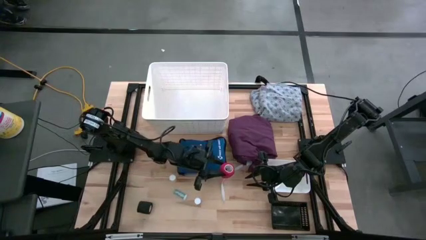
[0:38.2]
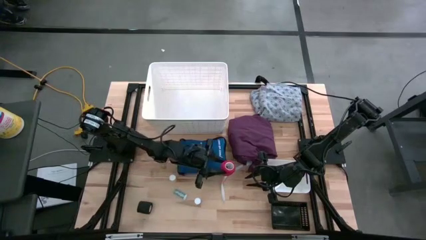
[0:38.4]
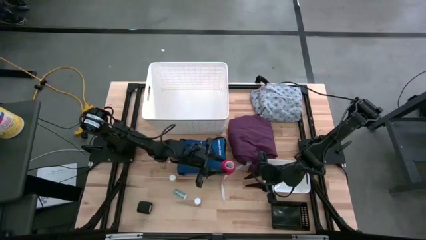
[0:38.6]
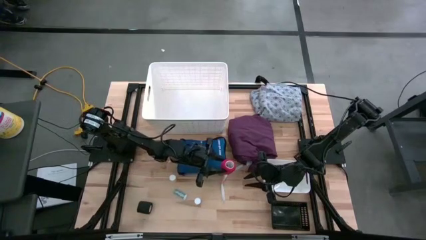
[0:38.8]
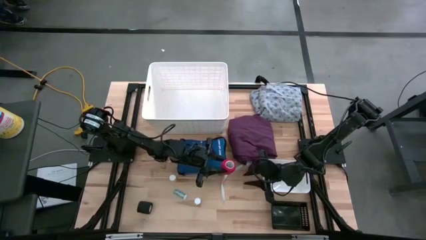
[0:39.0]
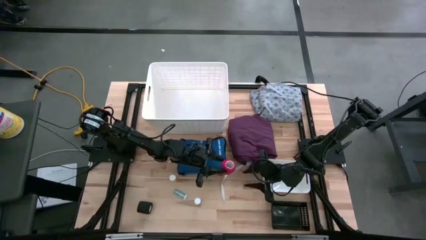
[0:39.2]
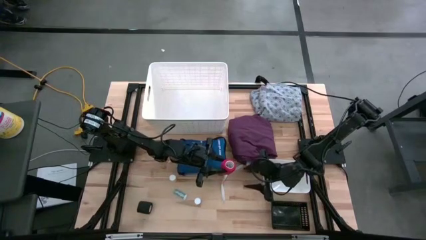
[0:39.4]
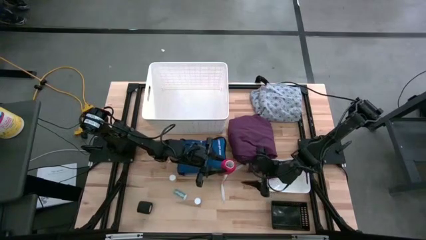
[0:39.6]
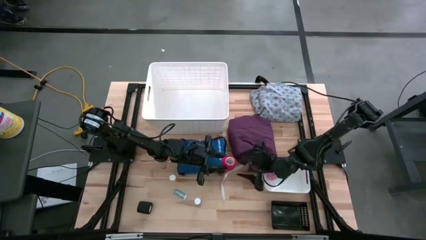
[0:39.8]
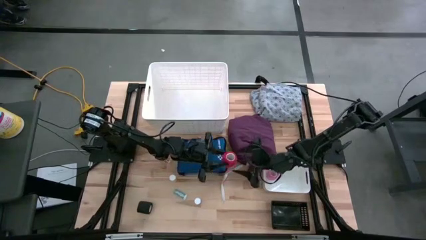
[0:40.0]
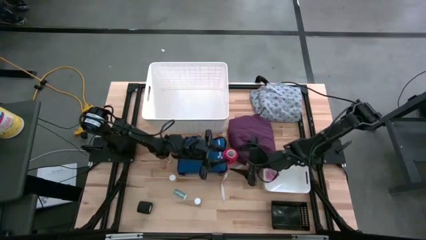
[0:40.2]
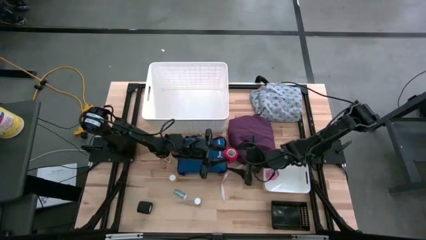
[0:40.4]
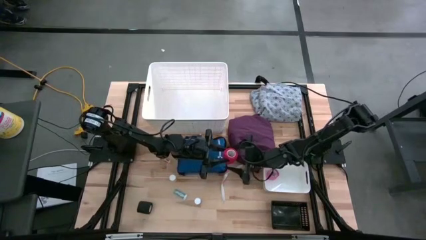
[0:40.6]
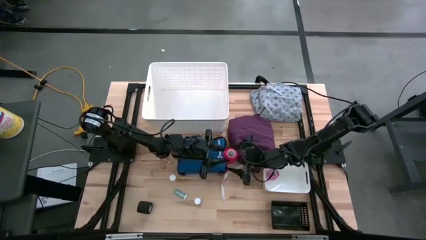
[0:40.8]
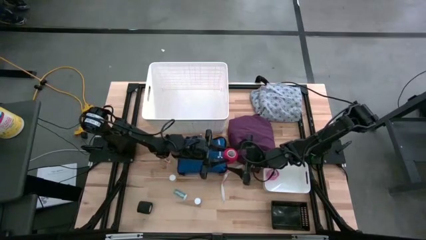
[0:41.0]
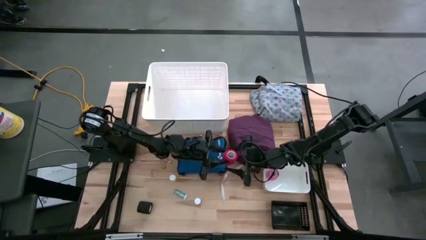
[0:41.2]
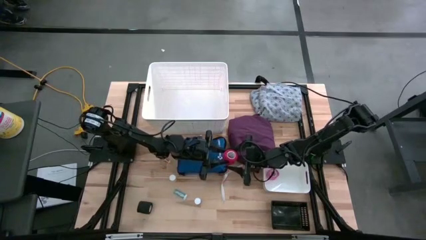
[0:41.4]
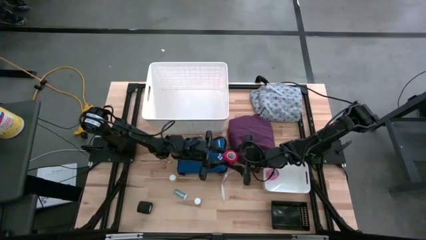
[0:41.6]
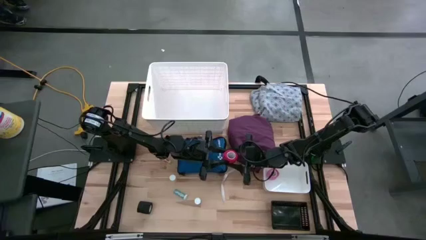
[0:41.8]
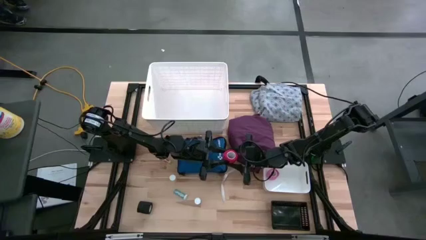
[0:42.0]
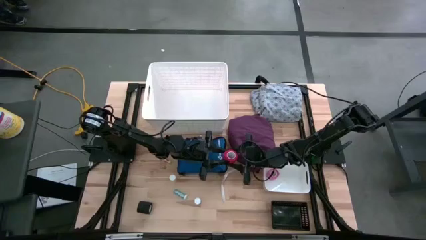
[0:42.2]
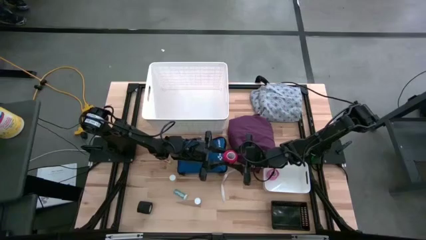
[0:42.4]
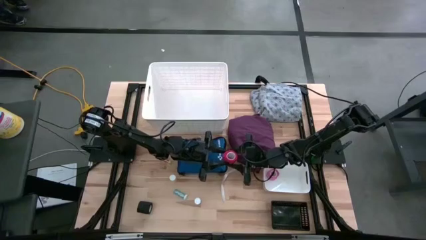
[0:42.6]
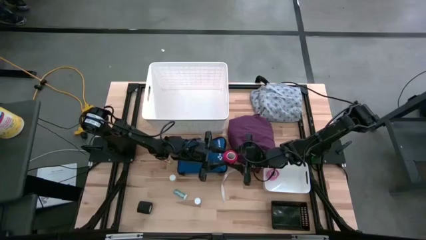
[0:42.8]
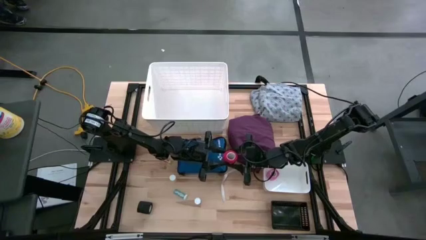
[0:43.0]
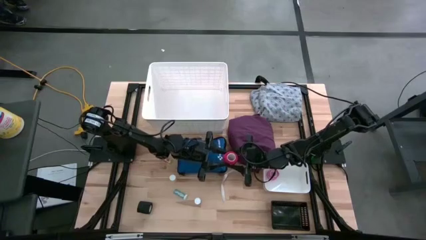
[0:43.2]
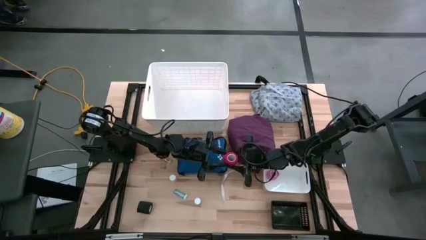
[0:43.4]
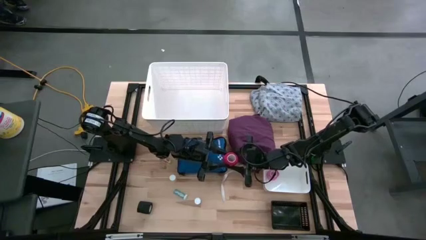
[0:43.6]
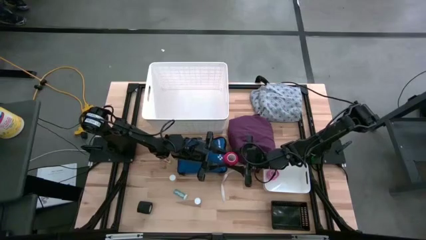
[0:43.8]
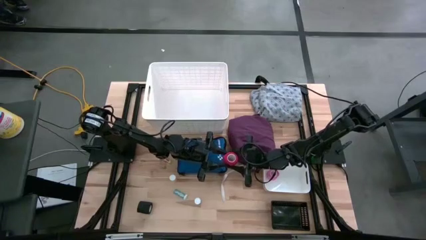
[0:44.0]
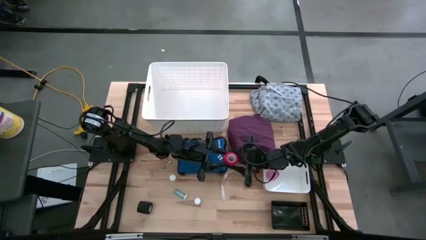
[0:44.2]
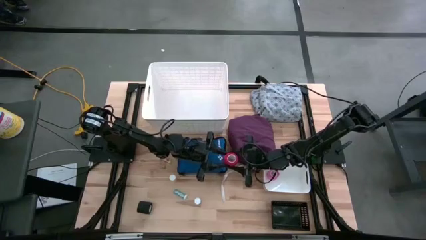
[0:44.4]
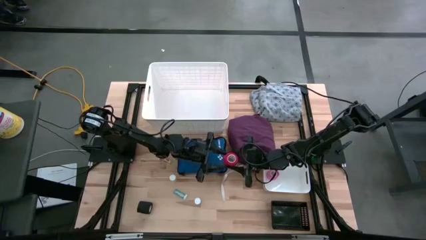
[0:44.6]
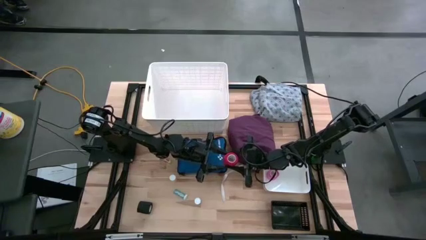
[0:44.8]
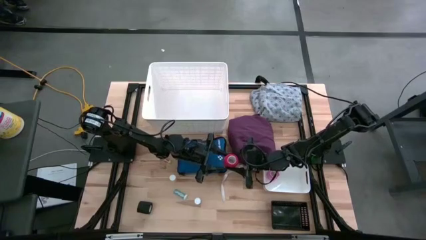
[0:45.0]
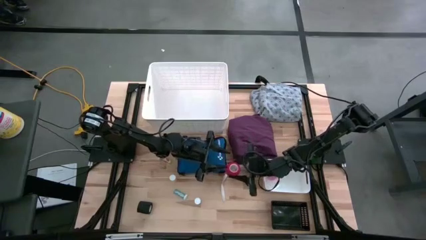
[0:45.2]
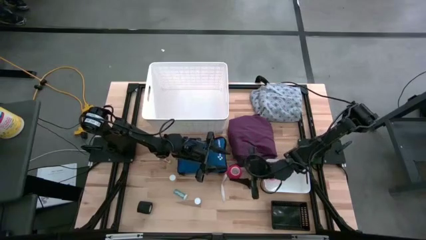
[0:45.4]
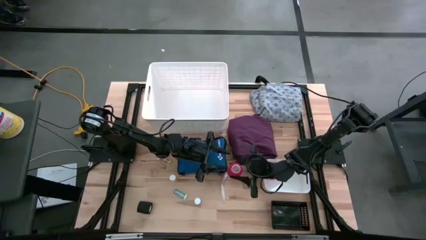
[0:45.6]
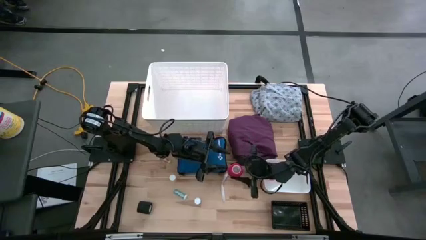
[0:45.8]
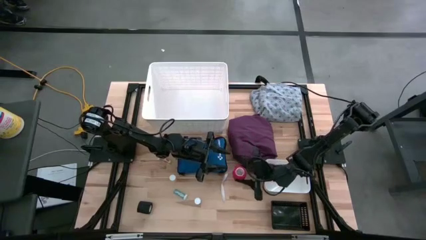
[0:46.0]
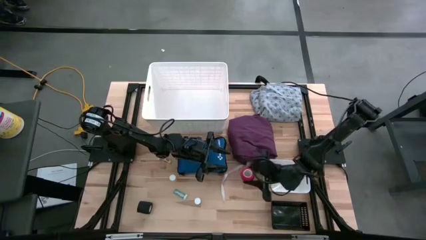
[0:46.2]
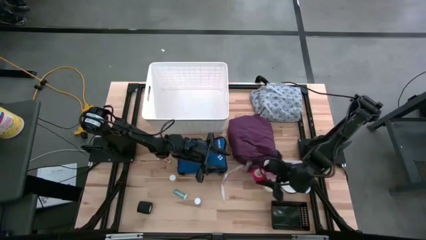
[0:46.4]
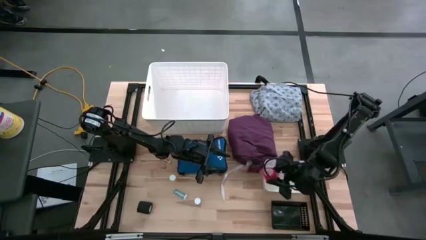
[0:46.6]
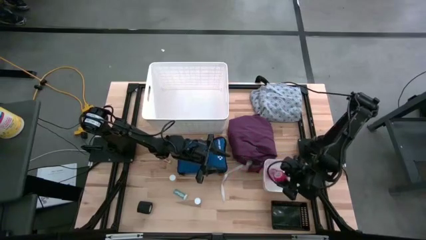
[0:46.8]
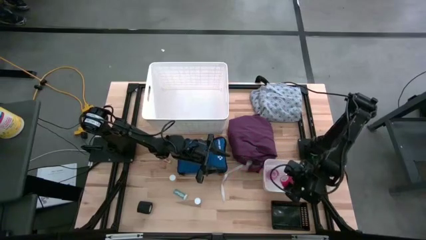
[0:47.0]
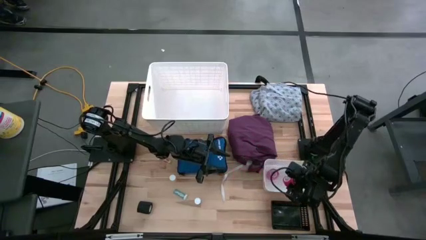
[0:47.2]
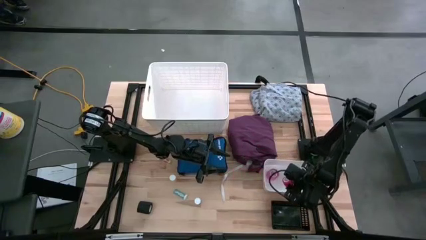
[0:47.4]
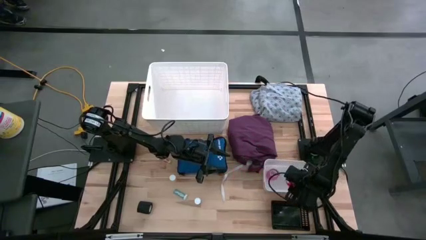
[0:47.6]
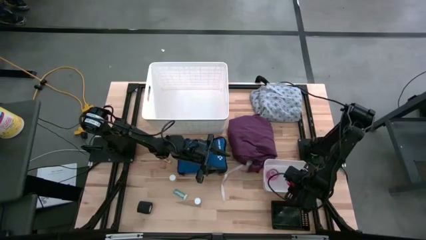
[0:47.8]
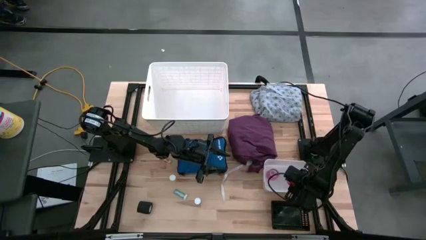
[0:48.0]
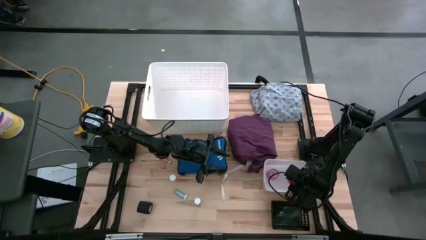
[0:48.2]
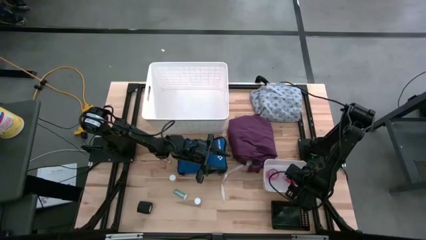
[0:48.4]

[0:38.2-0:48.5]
Task: Pick & Place Medicine items
Put the red bandage into the white bin

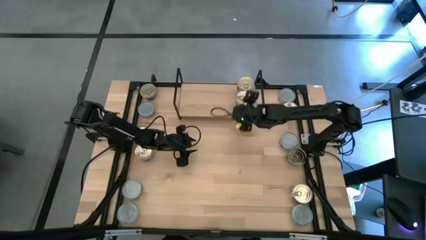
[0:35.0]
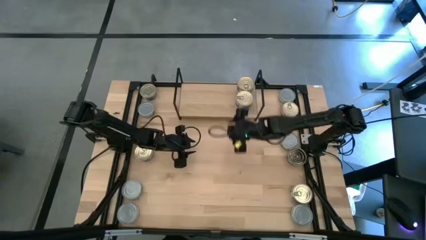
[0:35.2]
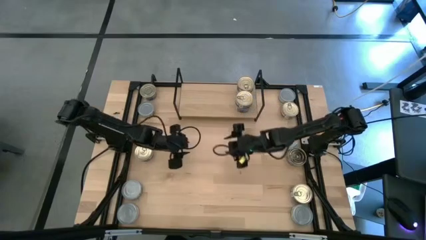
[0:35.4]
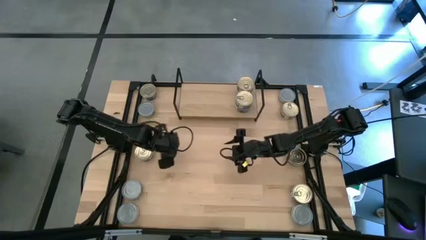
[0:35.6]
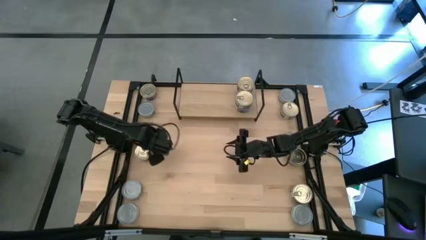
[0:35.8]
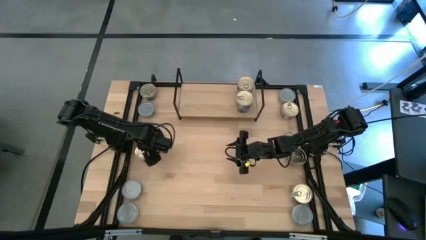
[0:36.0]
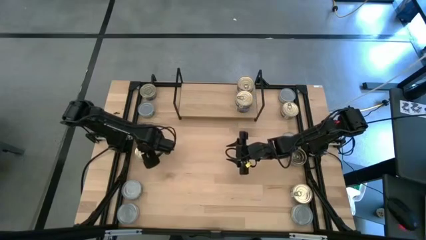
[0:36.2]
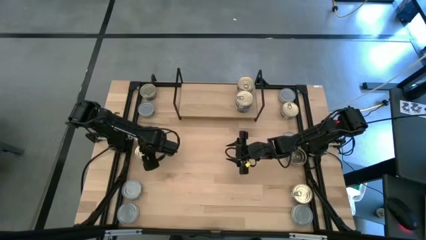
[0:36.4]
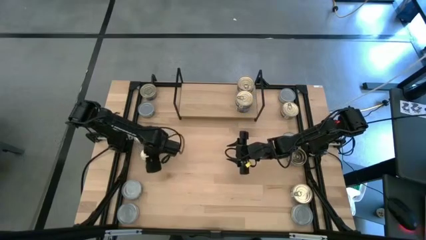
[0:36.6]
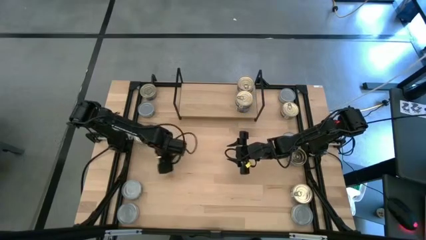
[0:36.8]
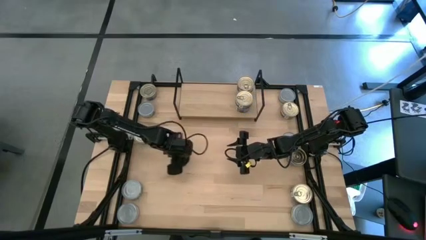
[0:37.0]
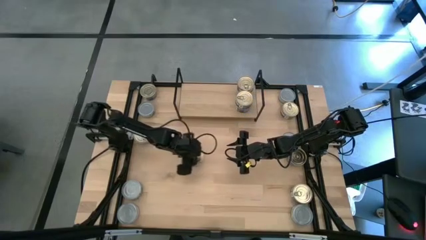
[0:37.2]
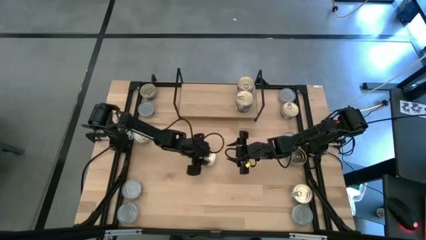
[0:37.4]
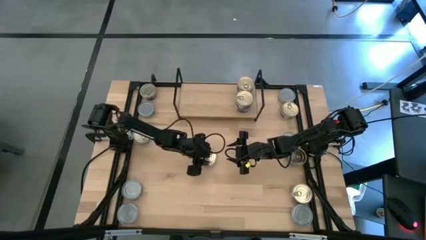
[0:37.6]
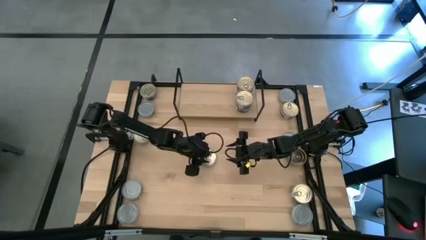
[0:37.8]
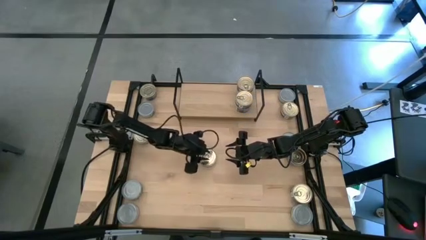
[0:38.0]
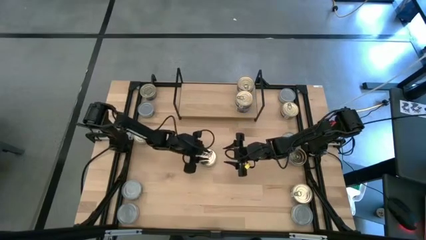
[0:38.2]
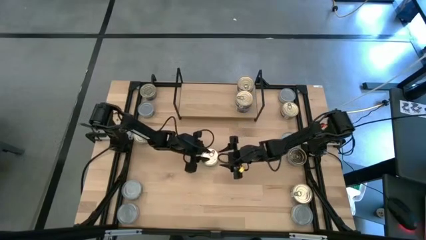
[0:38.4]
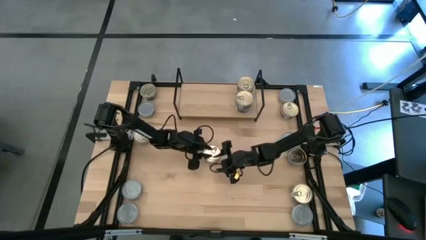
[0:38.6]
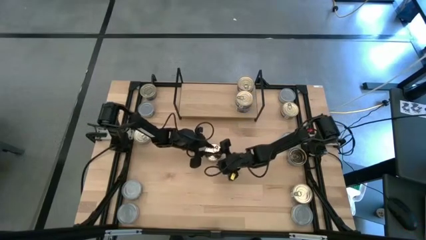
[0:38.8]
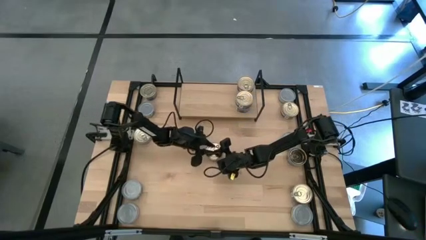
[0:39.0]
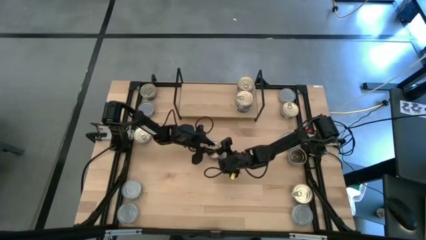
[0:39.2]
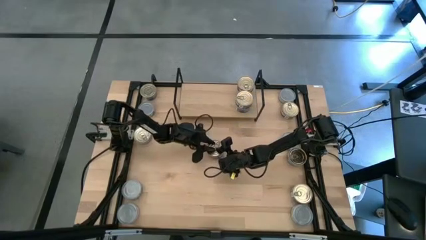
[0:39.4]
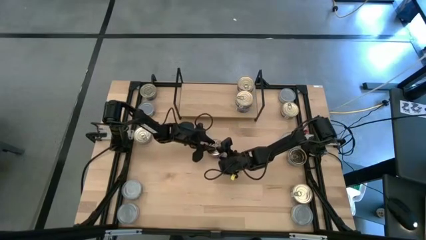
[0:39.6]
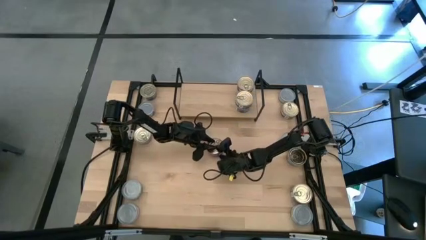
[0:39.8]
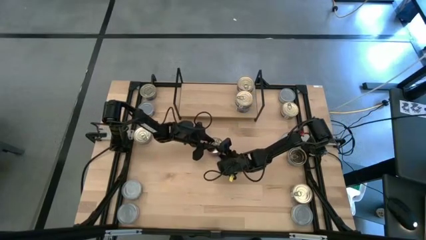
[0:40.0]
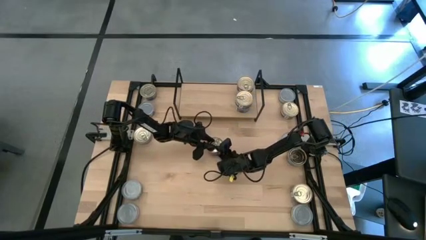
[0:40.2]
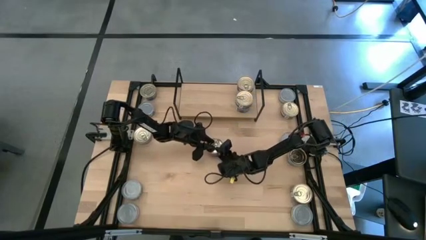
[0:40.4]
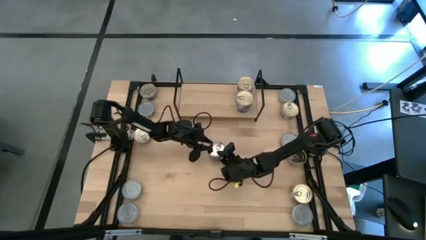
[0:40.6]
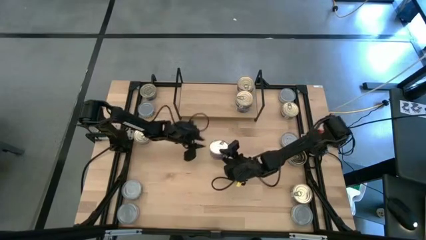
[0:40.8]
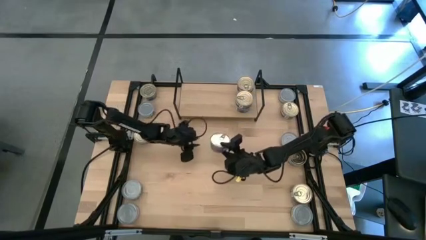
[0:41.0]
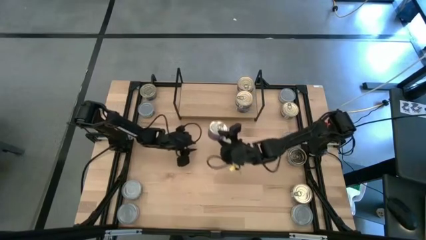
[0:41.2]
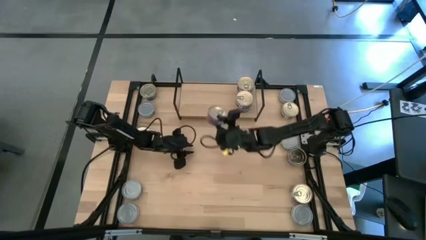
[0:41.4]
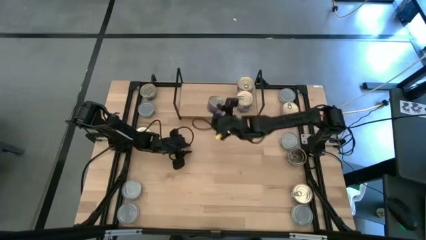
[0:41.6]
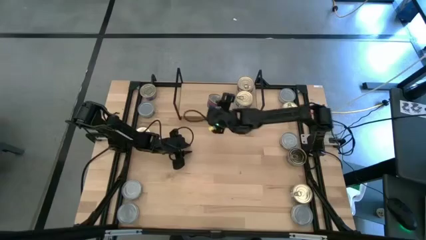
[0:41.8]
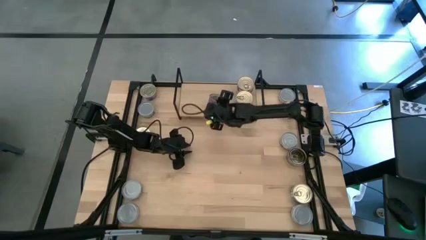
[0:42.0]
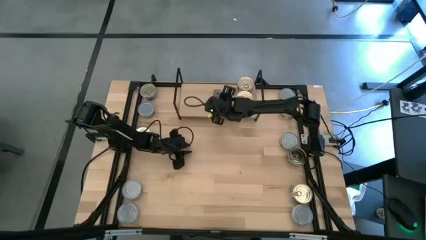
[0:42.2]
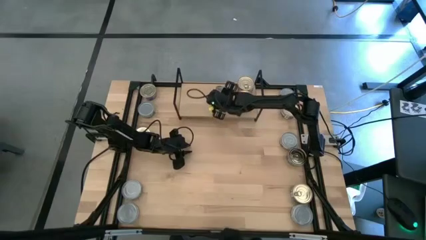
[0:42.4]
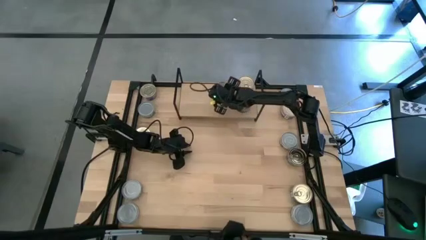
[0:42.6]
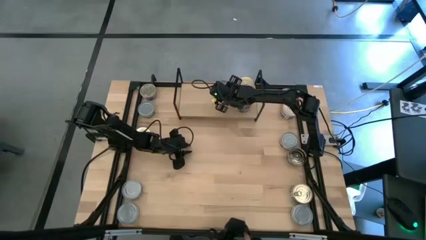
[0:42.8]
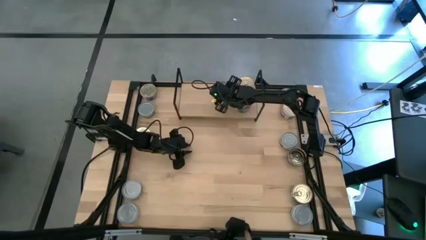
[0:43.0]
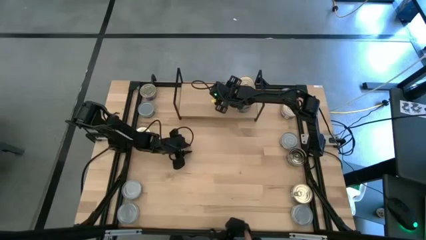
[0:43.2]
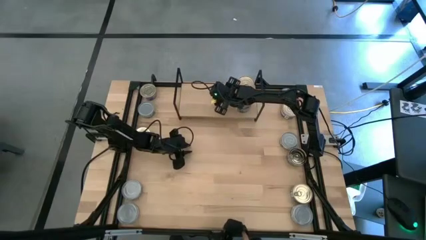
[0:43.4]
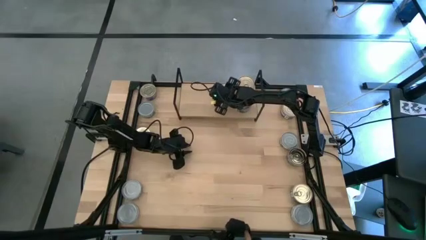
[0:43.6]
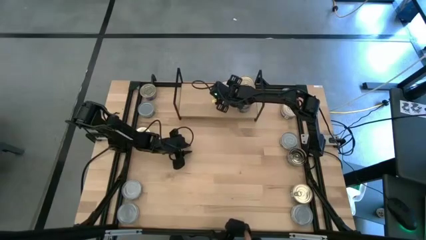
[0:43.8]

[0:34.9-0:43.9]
Task: Stack canned seafood by type on shelf
Put the blue and pink tuna can on the shelf
